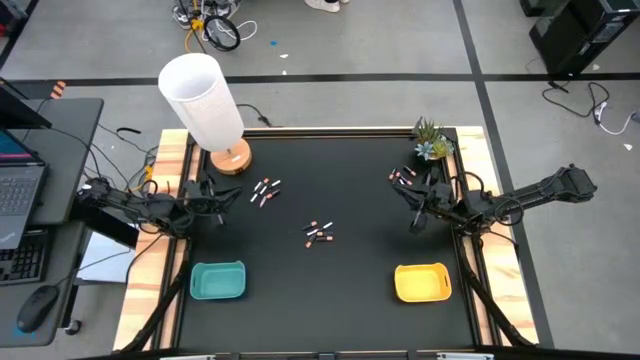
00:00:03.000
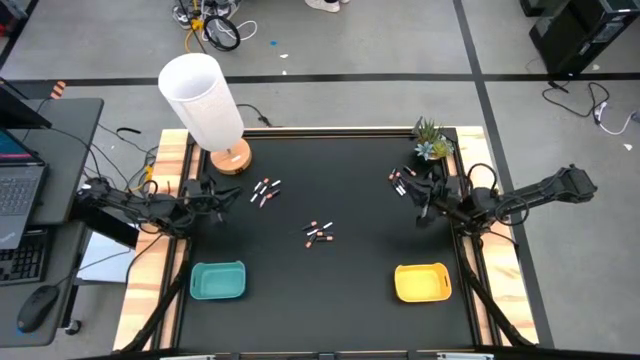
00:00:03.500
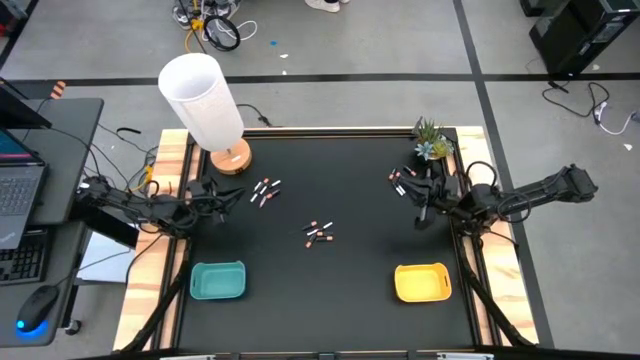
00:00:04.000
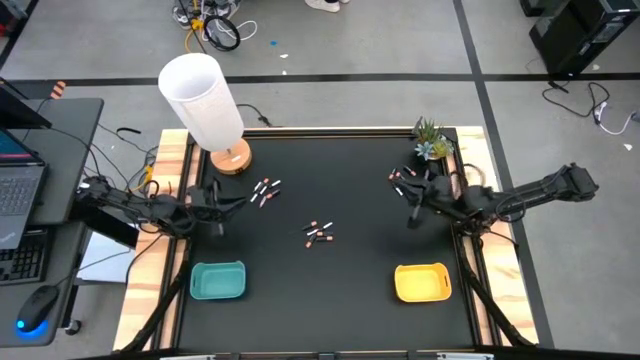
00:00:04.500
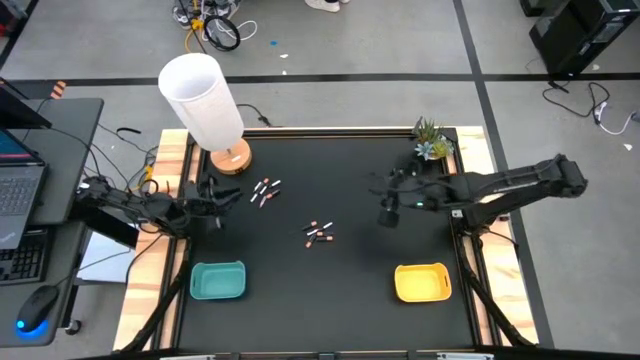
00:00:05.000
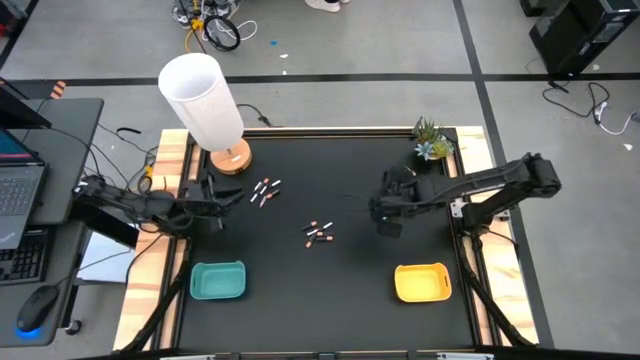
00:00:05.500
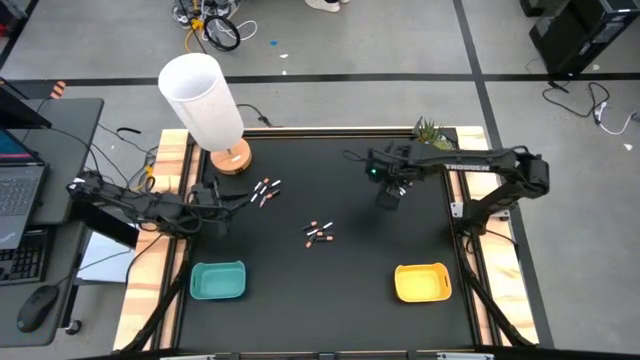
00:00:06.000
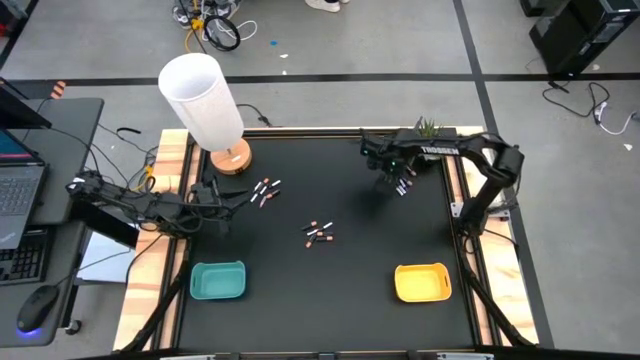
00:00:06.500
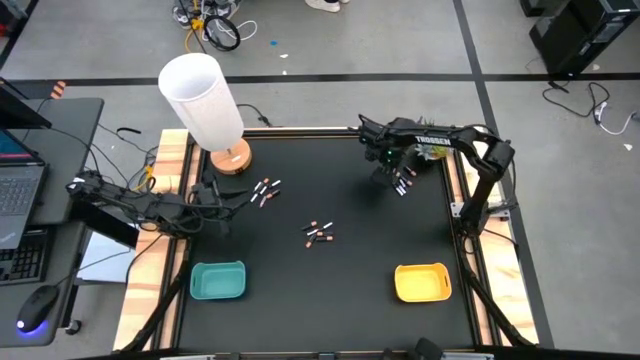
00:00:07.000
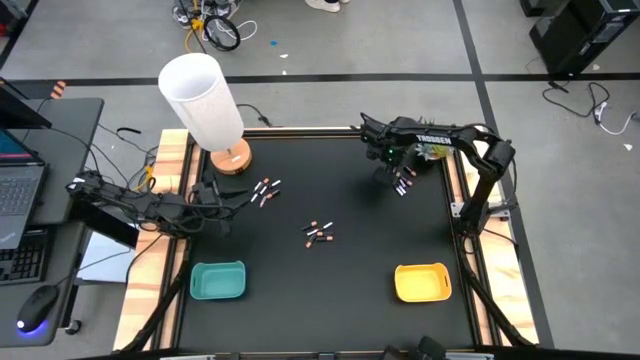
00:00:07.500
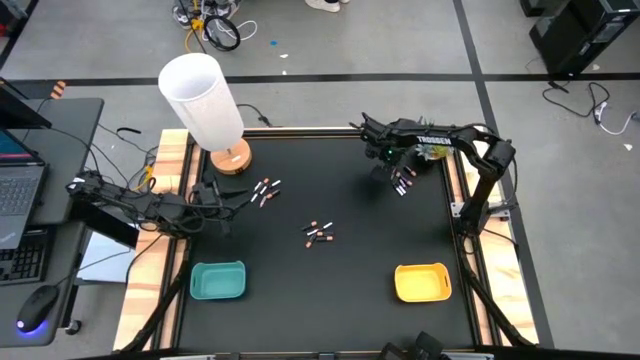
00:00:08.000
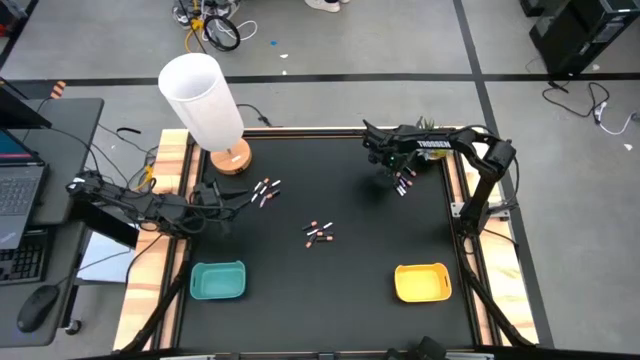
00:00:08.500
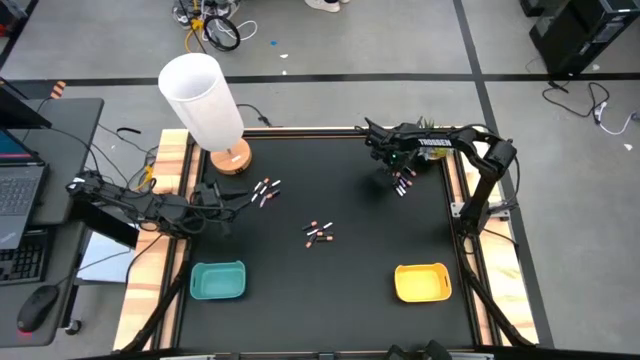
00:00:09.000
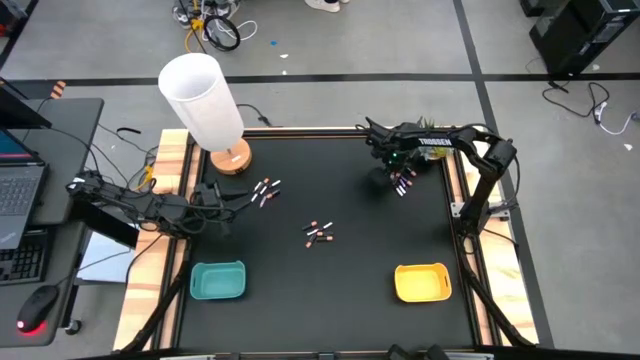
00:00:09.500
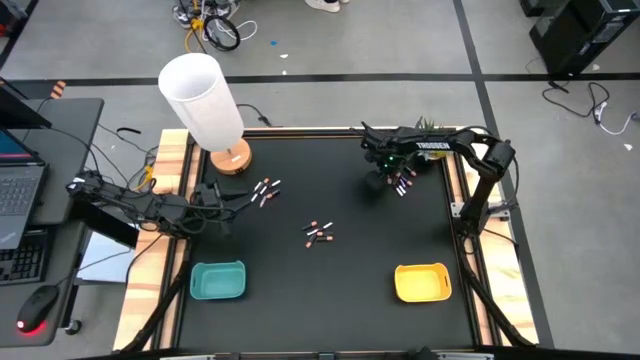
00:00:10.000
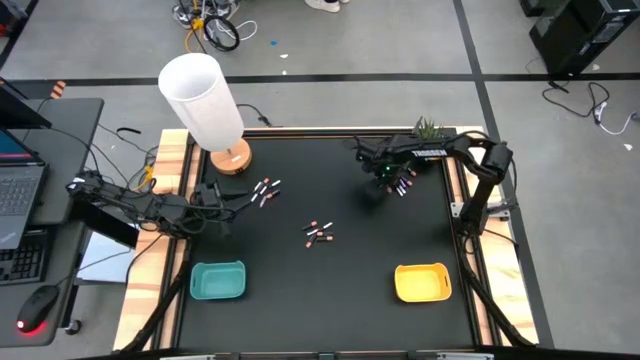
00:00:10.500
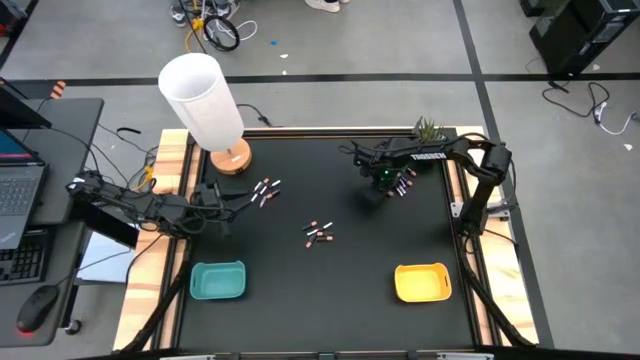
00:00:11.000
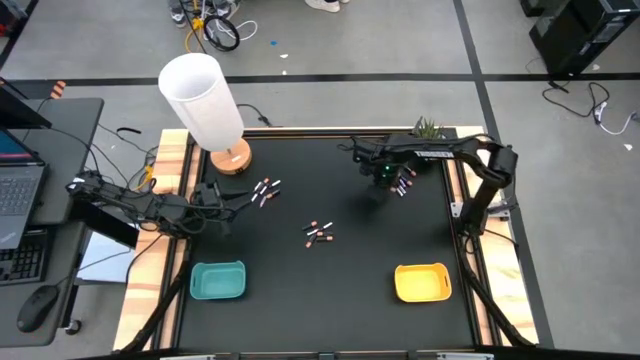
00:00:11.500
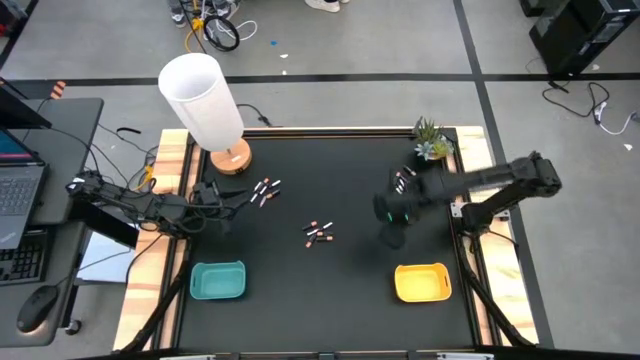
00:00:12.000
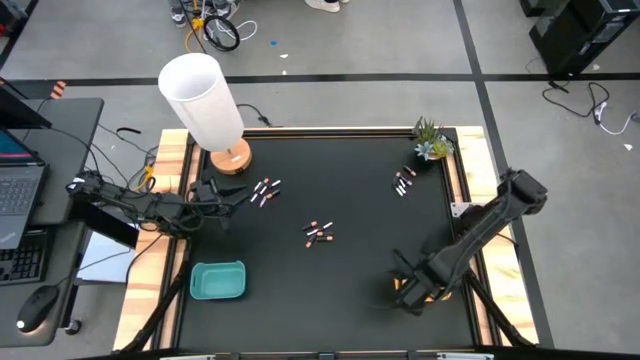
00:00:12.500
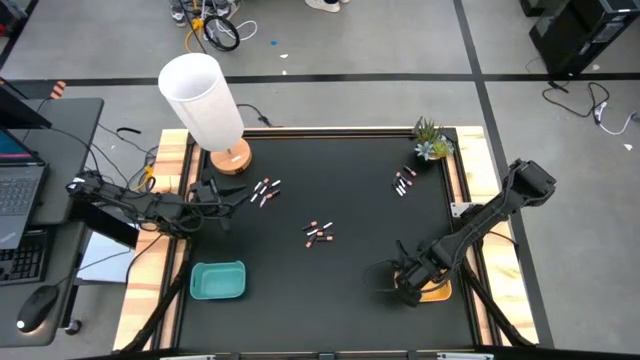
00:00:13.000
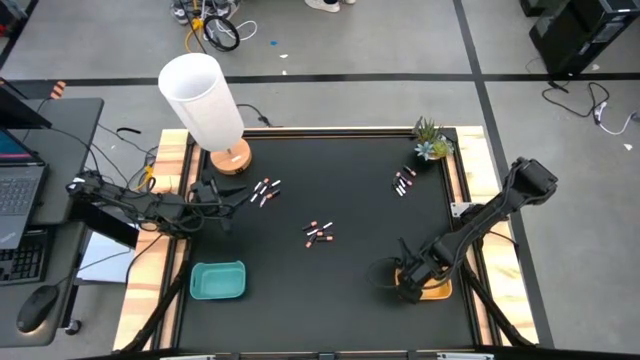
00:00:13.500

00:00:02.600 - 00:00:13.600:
Task: Sort batteries
Put the black battery into the yellow bin

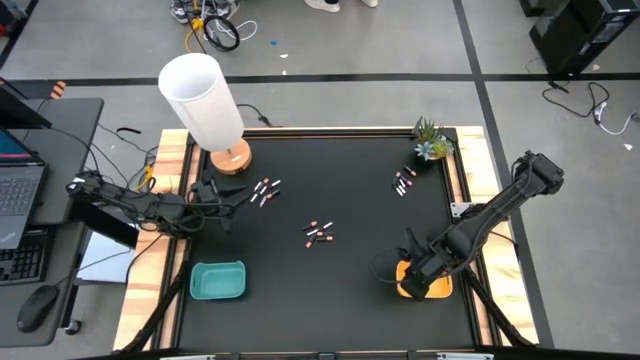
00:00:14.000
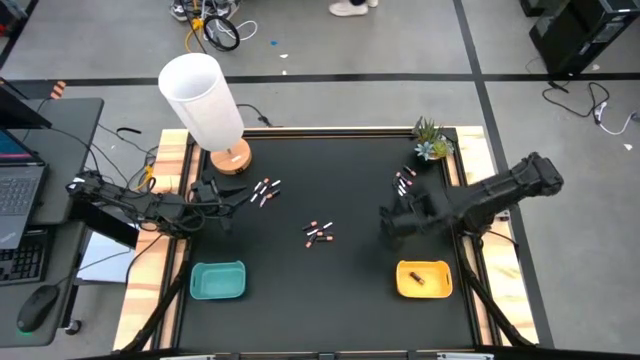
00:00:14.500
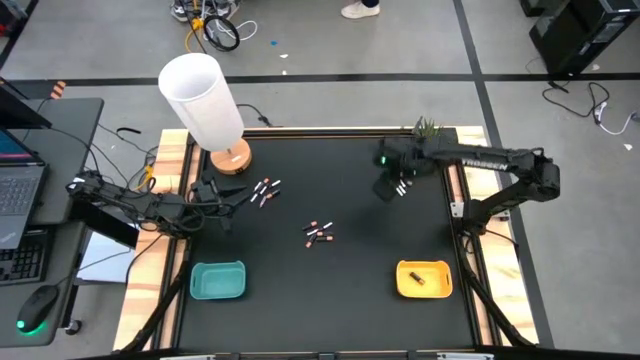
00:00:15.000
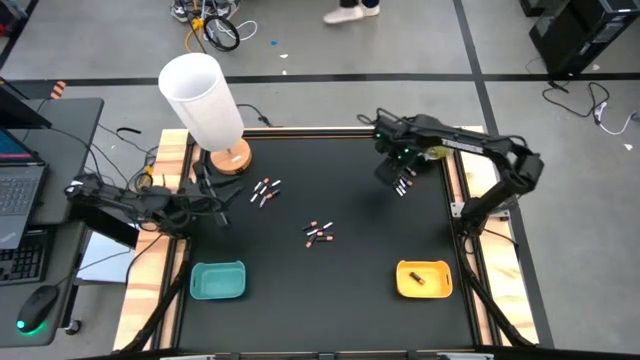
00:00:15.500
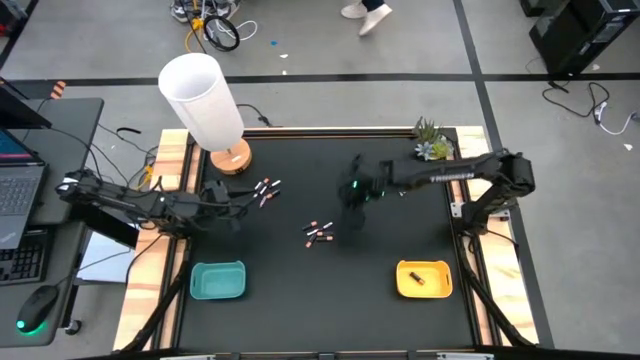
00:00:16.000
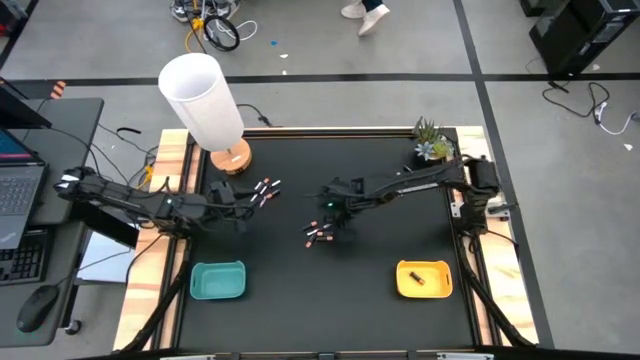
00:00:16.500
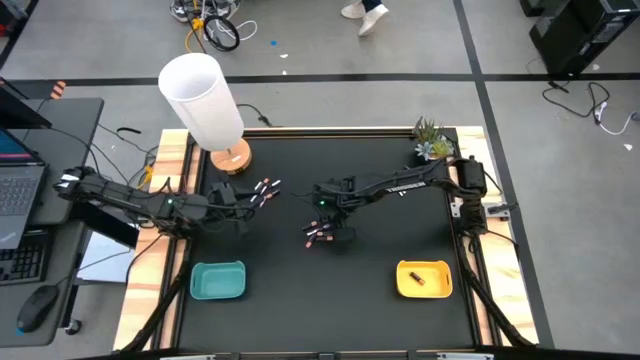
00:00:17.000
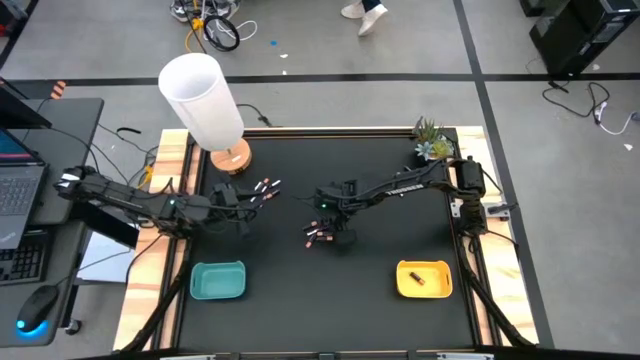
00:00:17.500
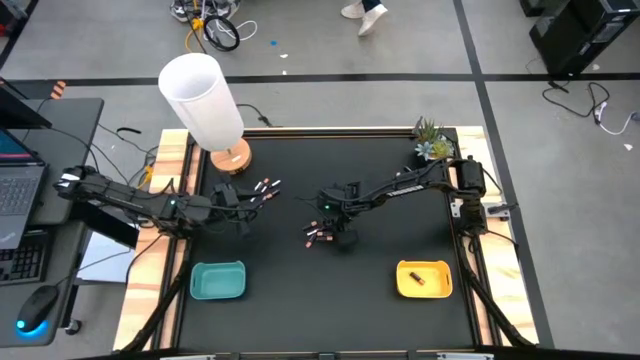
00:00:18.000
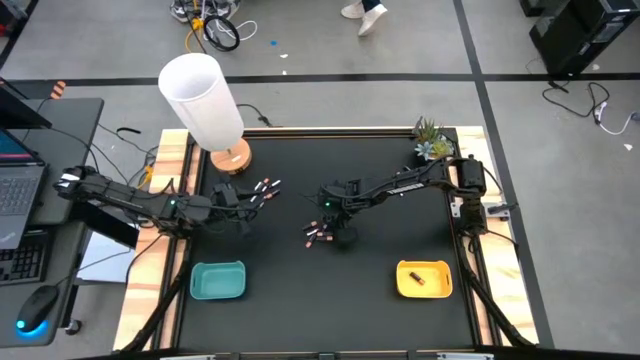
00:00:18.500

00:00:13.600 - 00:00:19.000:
Put the silver battery into the green bin

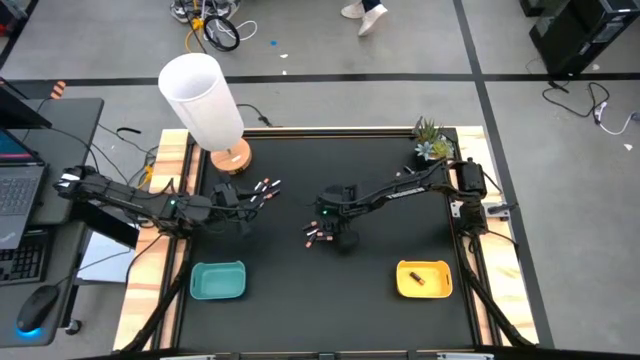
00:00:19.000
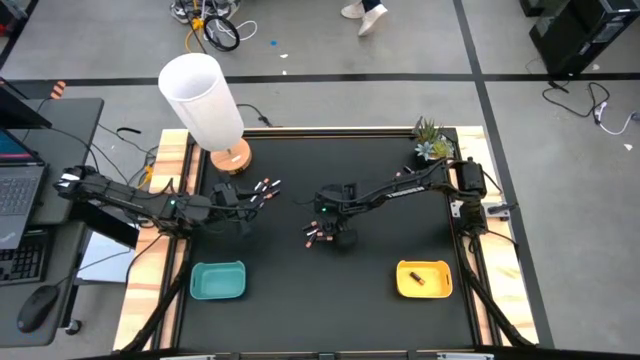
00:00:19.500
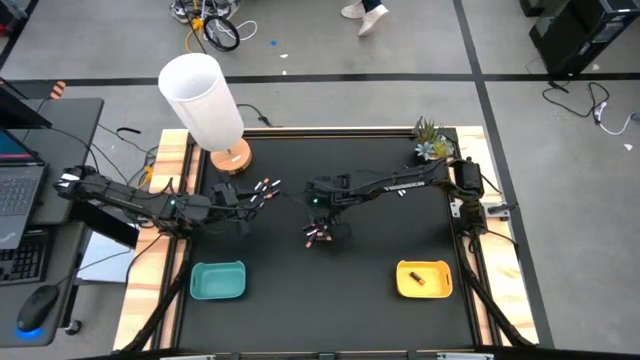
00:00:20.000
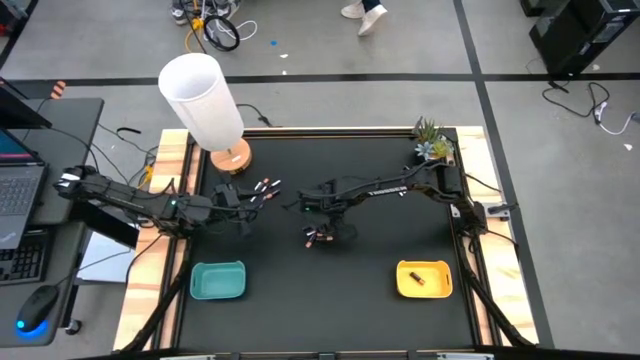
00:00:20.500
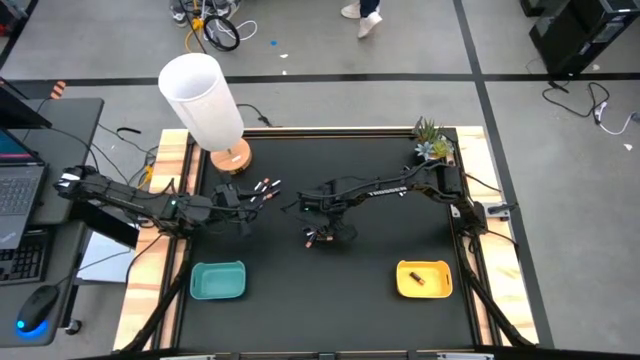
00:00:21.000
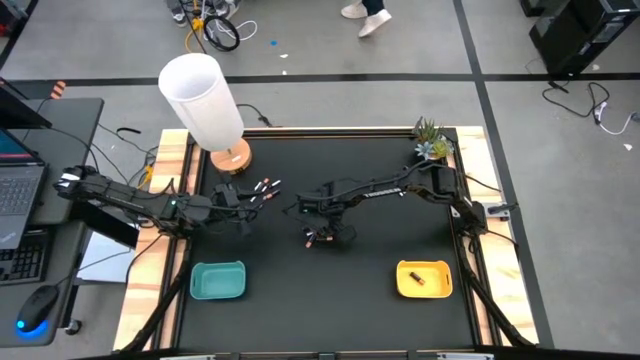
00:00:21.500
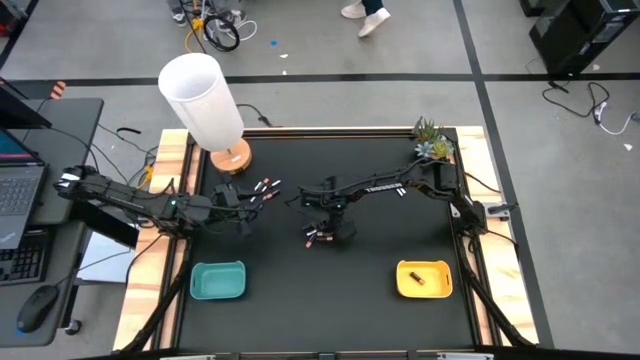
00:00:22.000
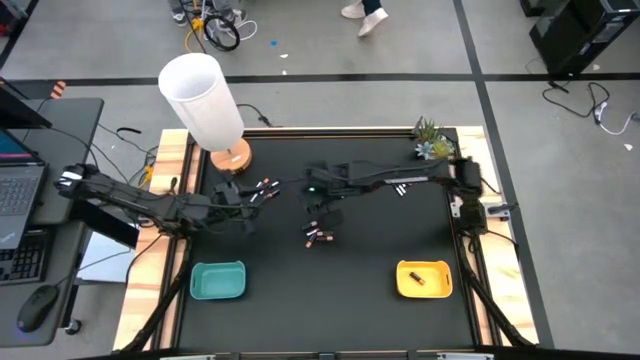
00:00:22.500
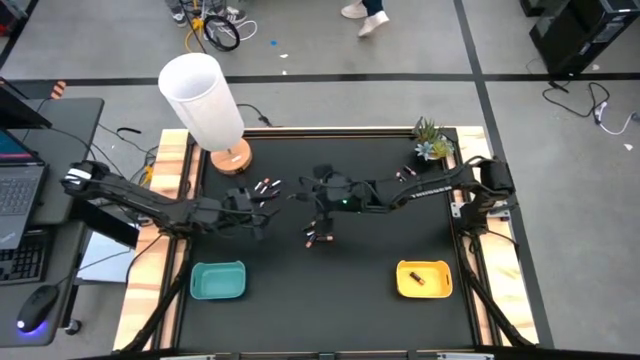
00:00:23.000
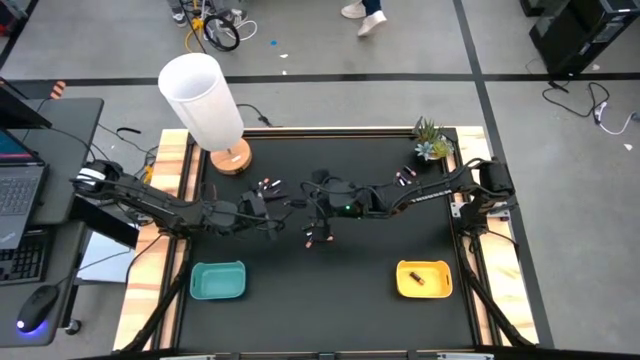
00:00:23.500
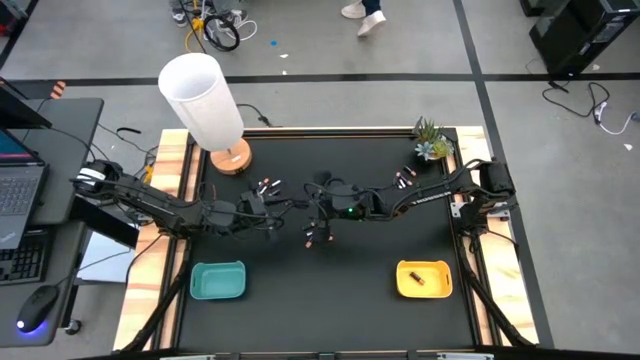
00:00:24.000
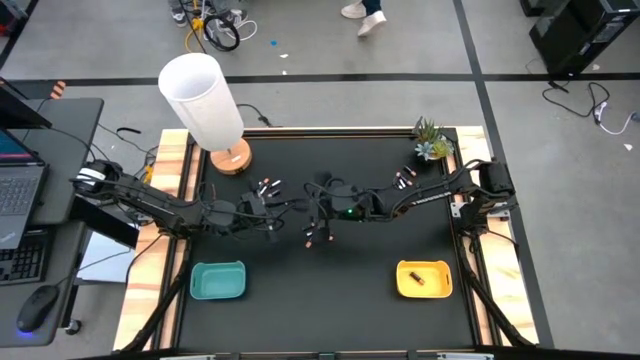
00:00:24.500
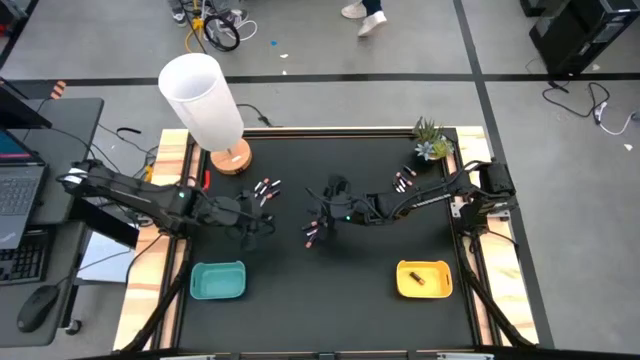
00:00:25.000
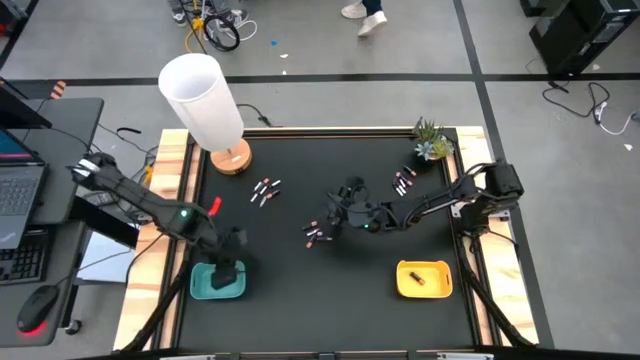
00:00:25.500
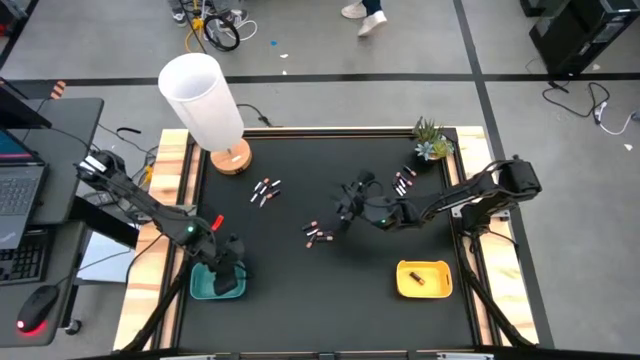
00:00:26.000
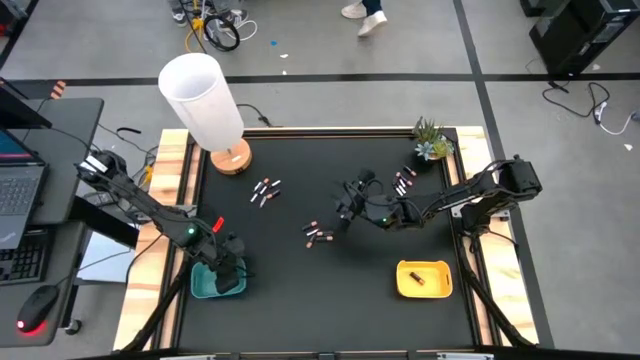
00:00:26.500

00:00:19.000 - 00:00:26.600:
Put the silver battery into the green bin
